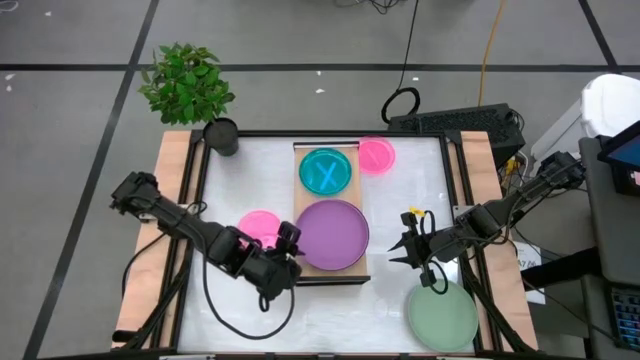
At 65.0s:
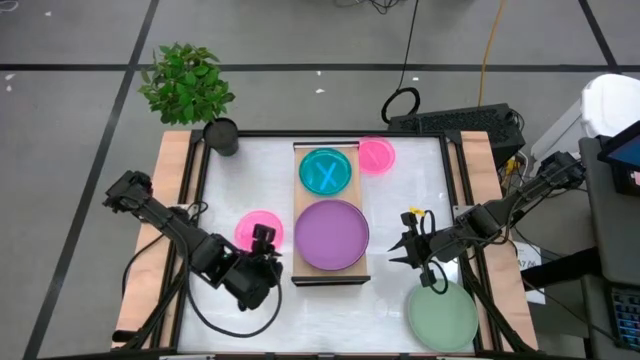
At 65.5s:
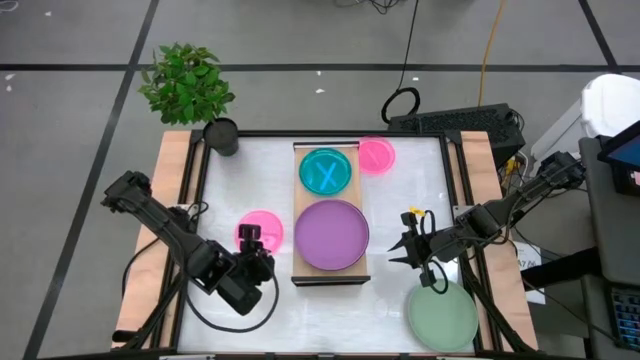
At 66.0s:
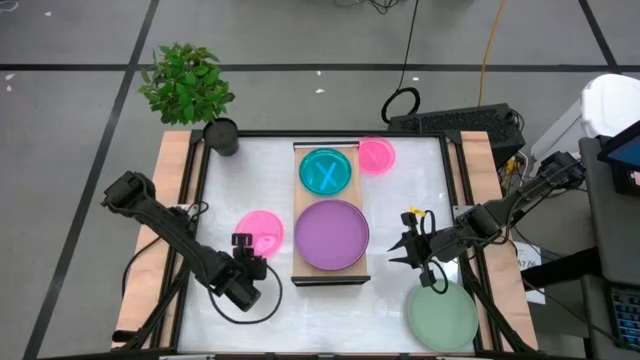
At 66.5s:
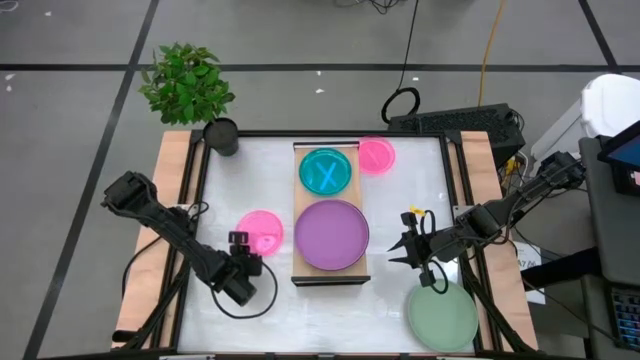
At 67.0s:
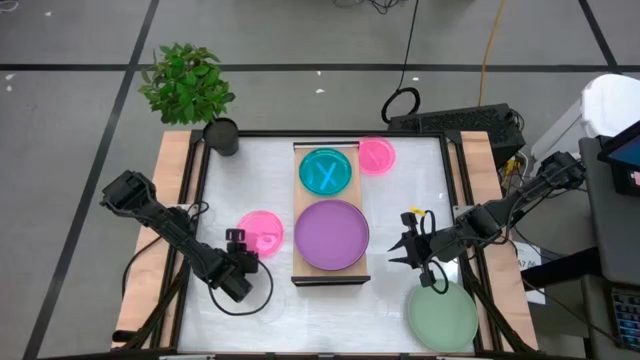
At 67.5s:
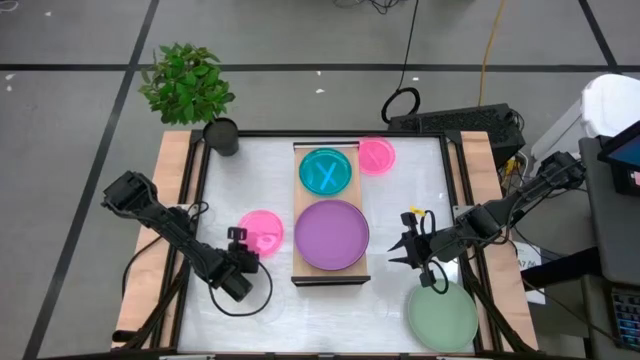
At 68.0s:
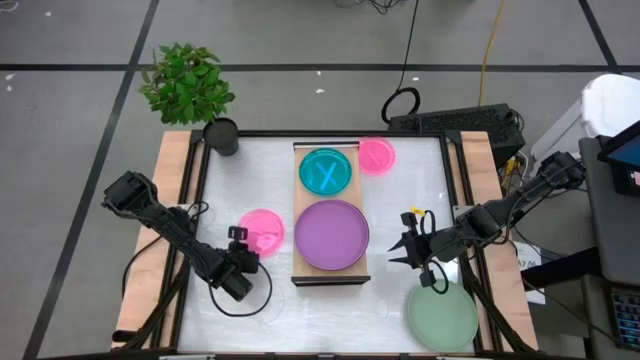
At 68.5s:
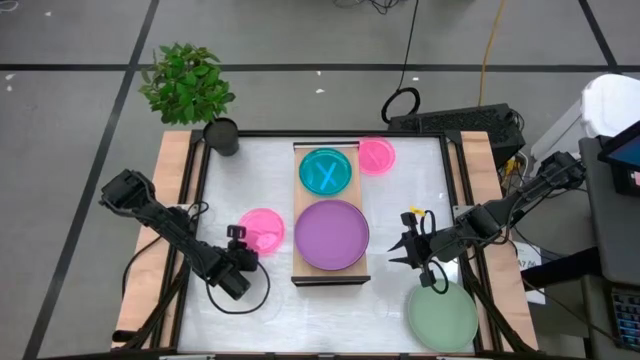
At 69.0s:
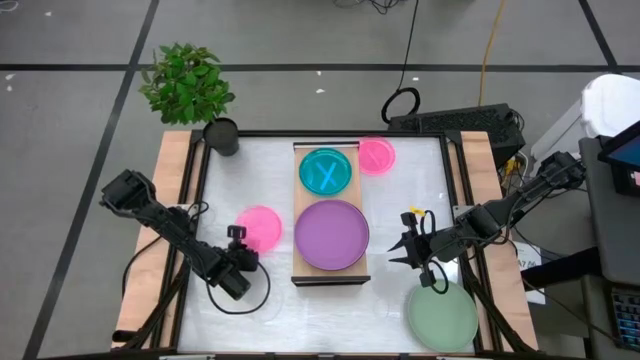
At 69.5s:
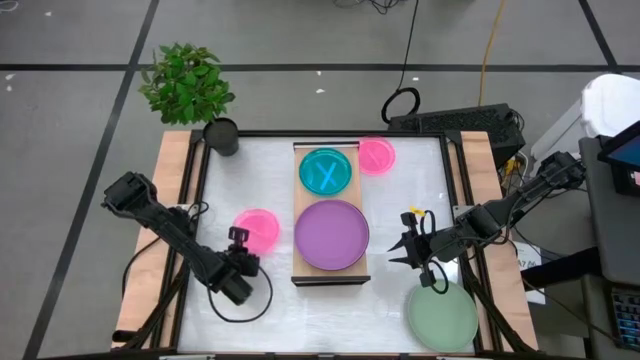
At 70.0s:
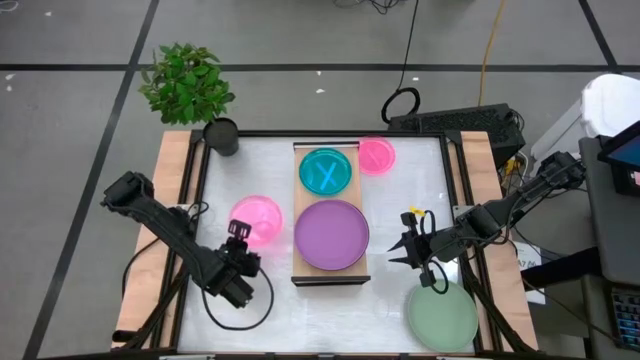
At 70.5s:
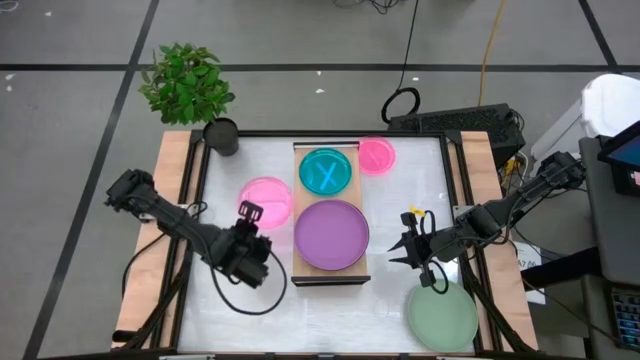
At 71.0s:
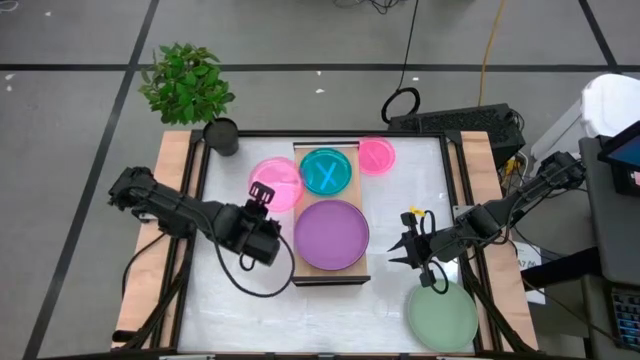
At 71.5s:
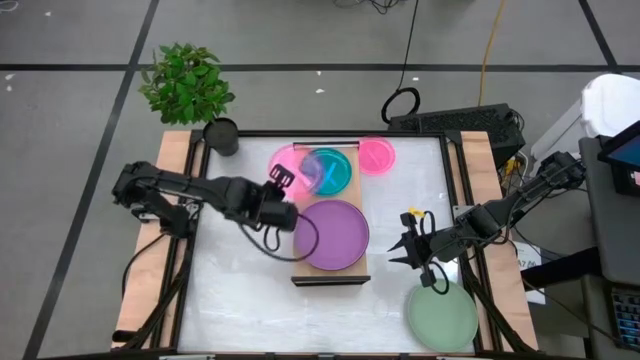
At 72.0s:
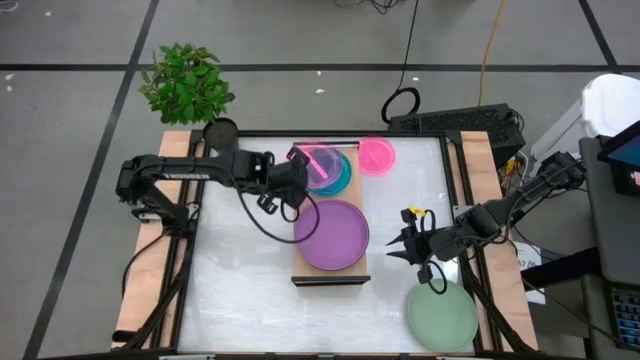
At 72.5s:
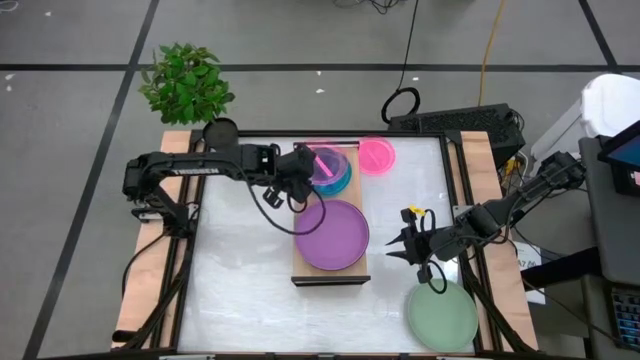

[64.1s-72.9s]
Task: Place and stack plates onto a shelf
Stack the bottom pink plate on top of the blue plate on the shelf

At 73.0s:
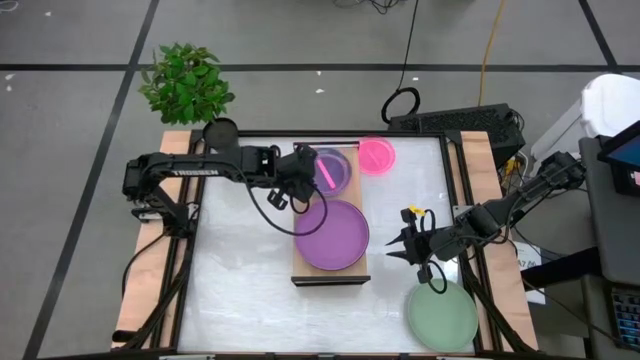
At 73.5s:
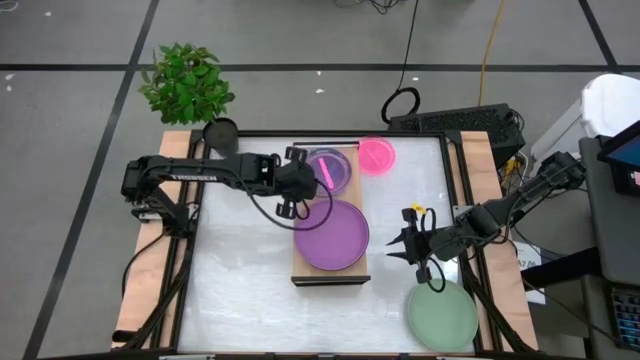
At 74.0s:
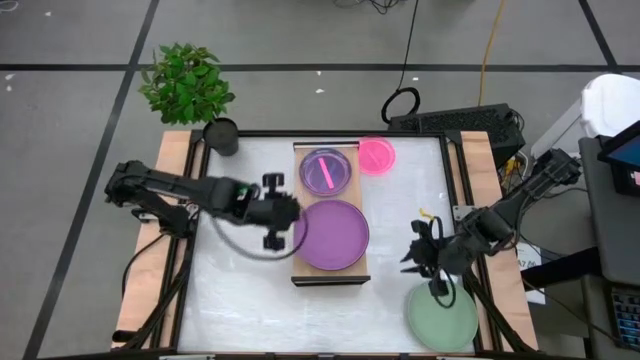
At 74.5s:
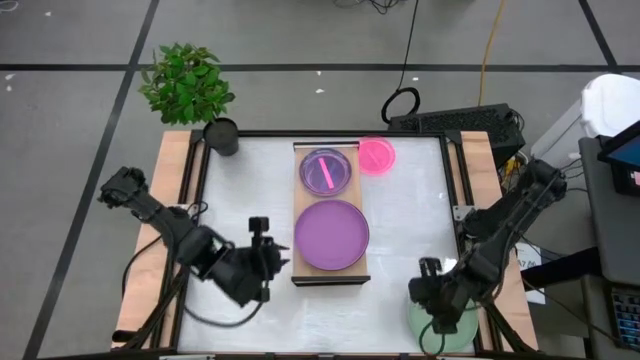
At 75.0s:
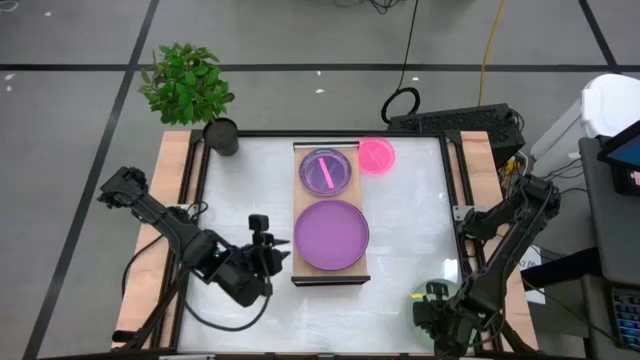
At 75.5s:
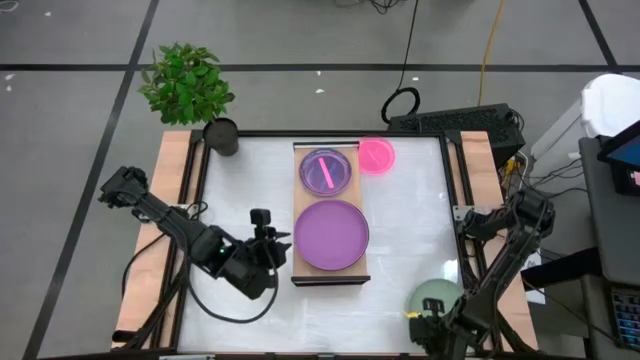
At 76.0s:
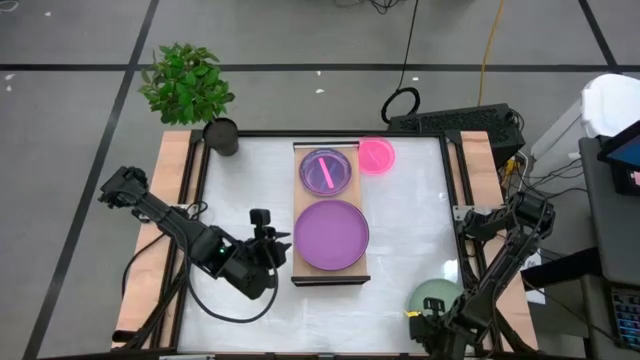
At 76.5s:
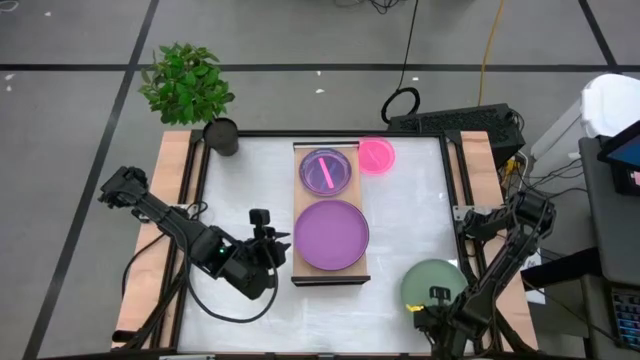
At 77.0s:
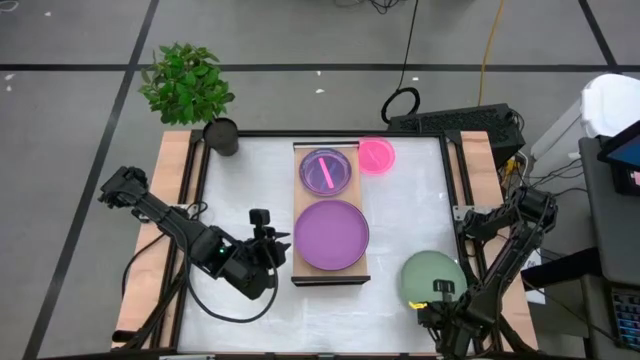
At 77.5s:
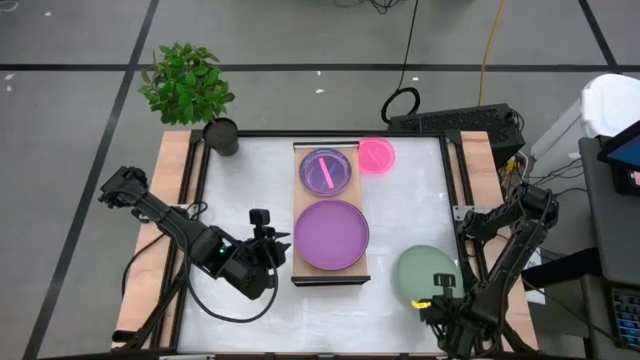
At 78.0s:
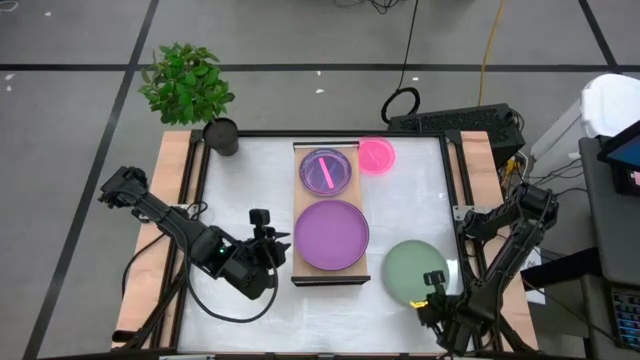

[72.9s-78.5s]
Stack the green plate on top of the purple plate

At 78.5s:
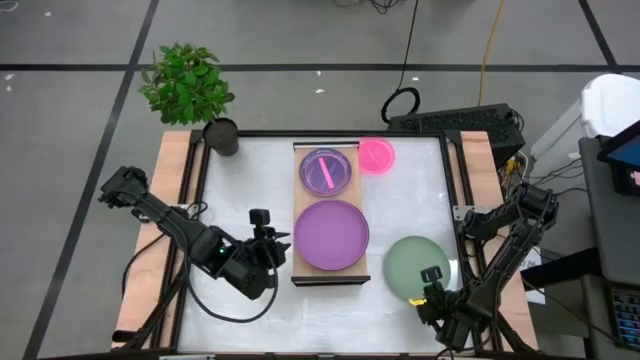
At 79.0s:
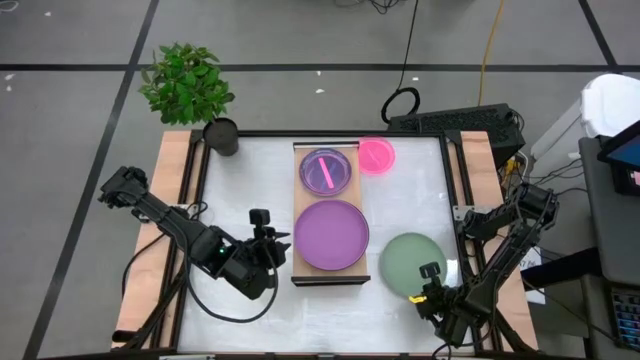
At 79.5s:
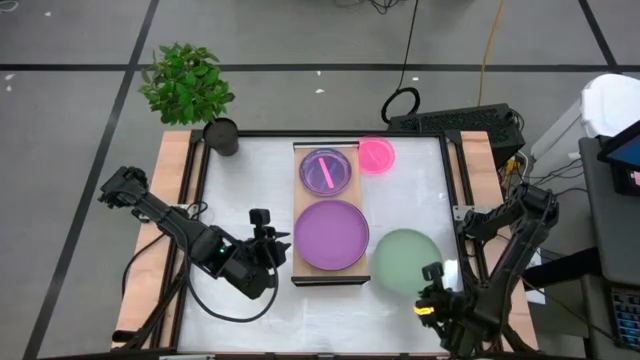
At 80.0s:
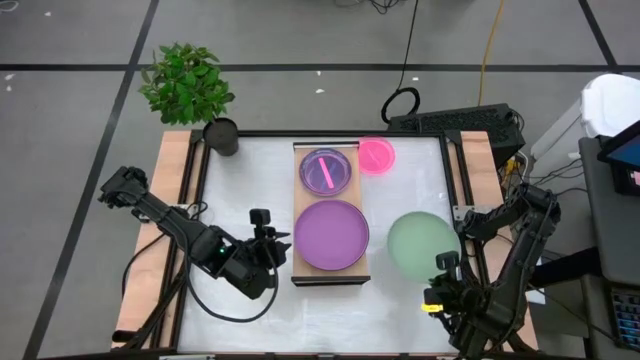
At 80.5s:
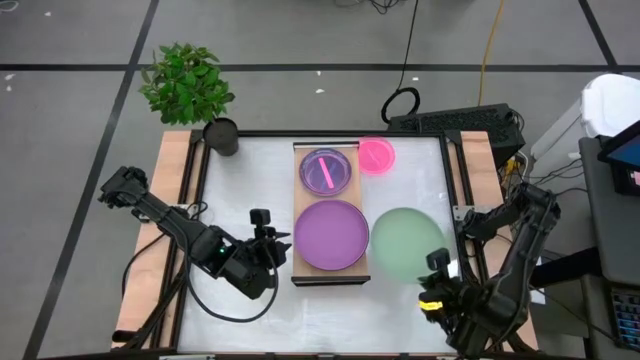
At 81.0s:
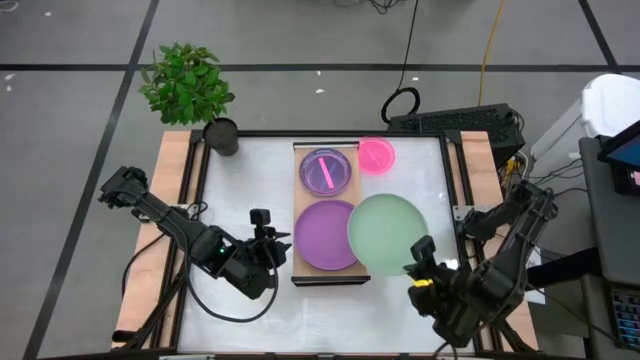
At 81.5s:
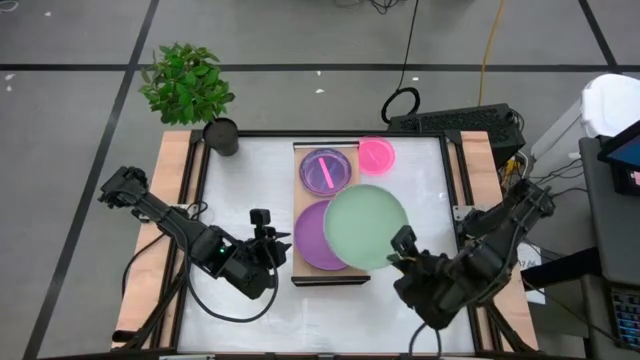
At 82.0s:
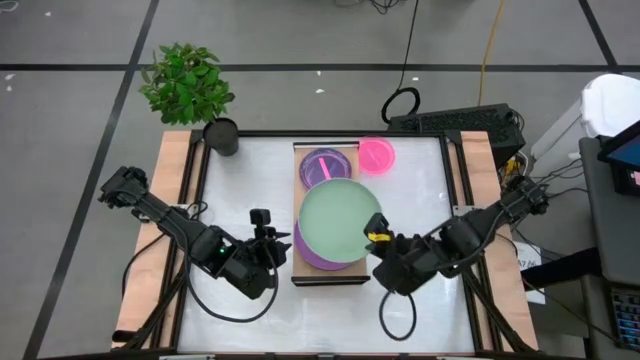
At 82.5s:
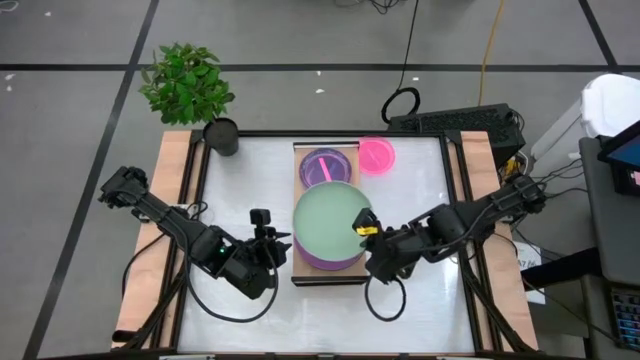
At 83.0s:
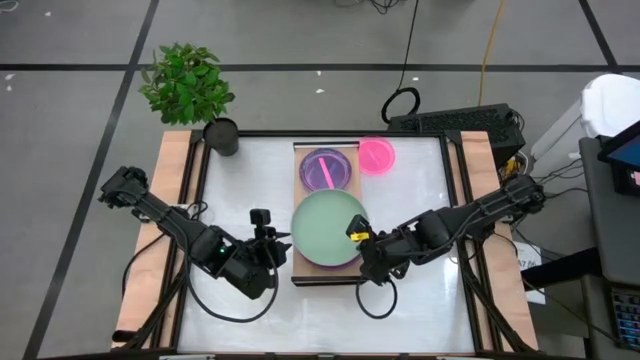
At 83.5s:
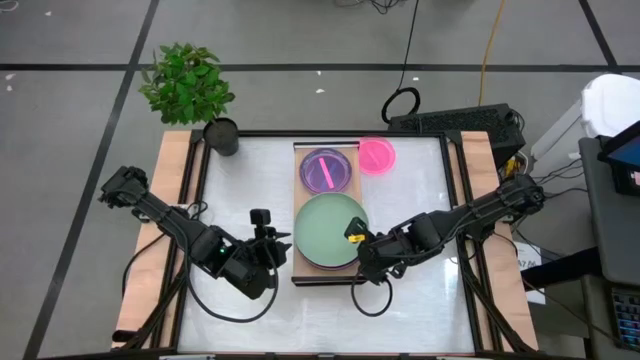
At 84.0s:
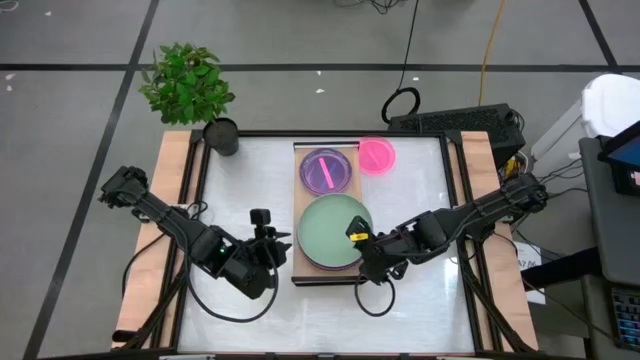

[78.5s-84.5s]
Stack the green plate on top of the purple plate

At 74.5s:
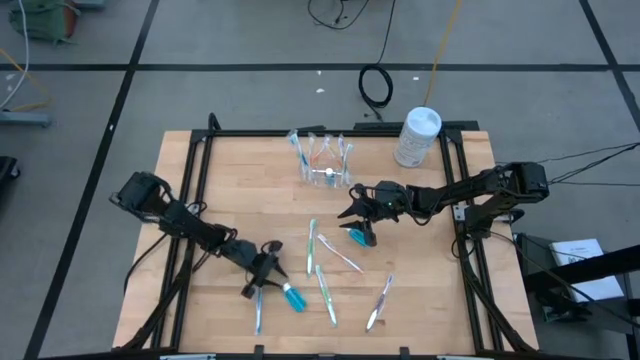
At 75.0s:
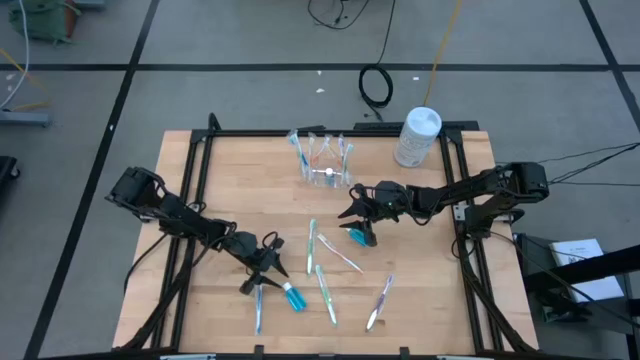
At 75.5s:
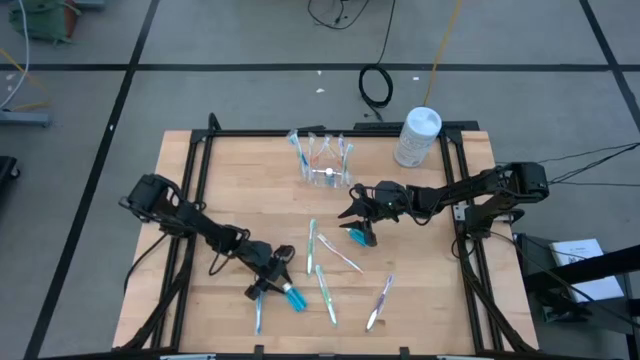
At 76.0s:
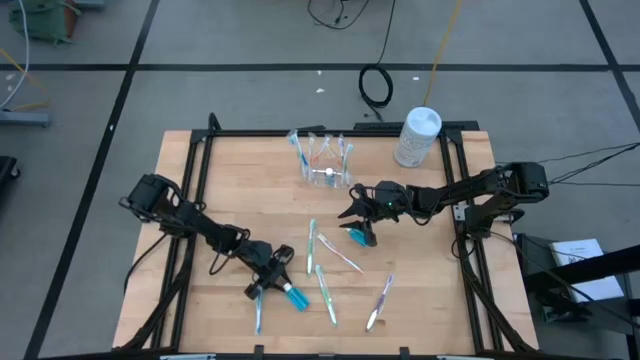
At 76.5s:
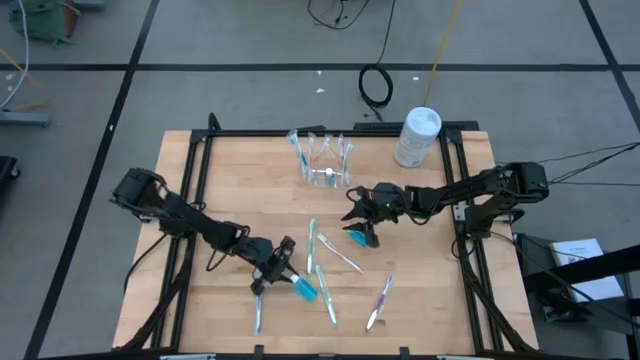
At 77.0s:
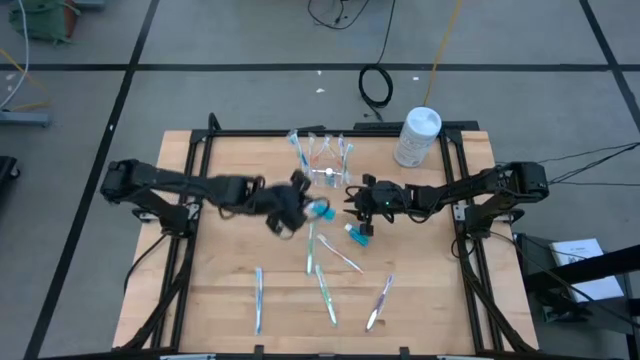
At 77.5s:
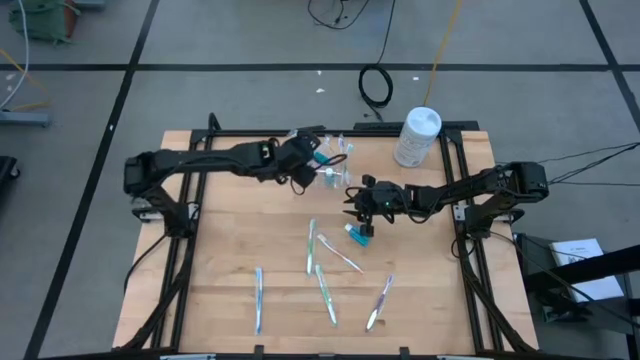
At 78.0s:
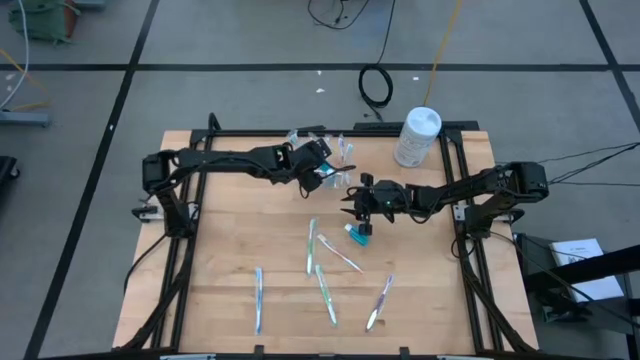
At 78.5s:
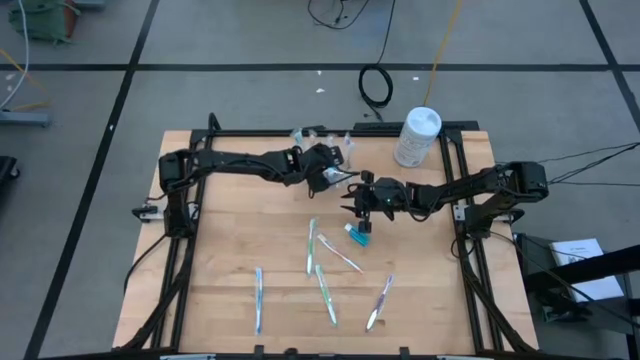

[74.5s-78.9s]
Task: Pick & Place toothbrushing station
Put the blue mouthwash into the transparent organizer
